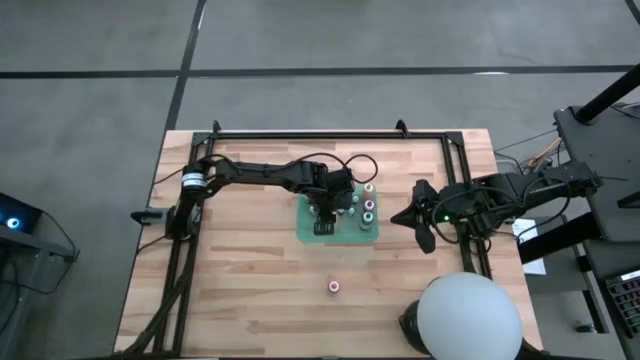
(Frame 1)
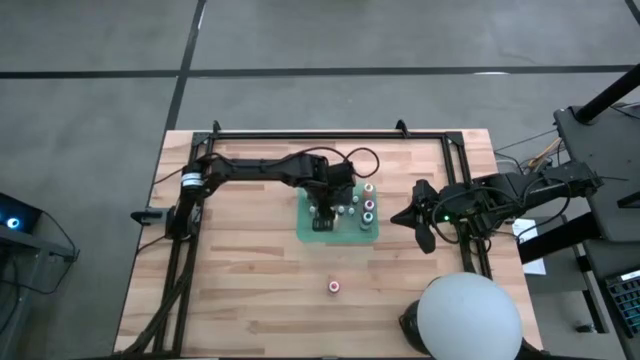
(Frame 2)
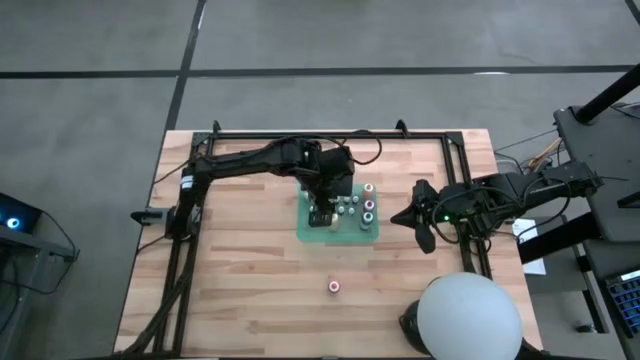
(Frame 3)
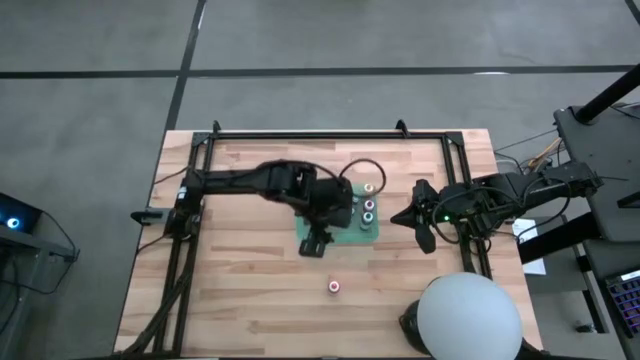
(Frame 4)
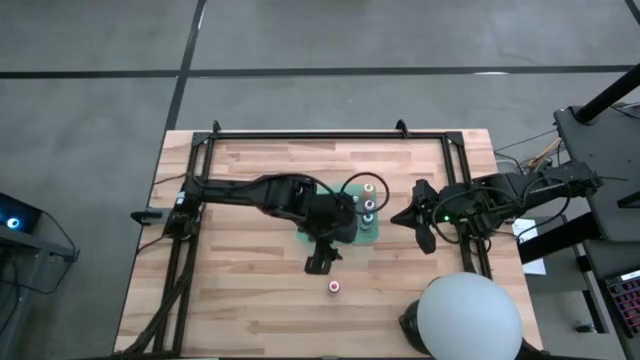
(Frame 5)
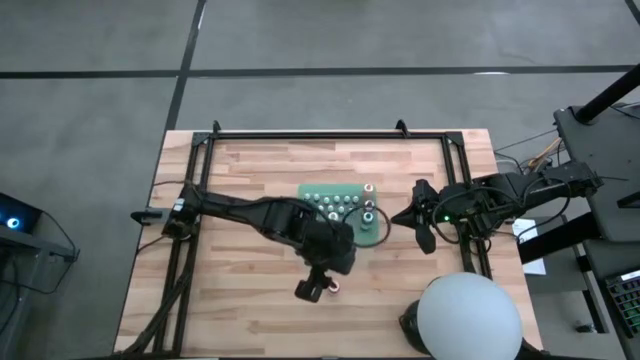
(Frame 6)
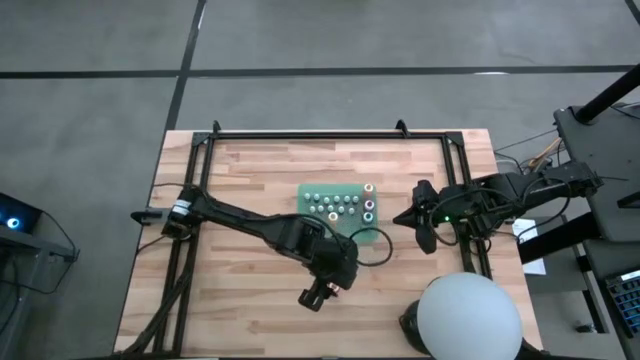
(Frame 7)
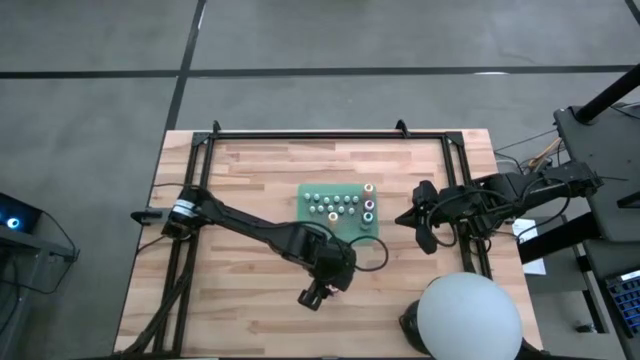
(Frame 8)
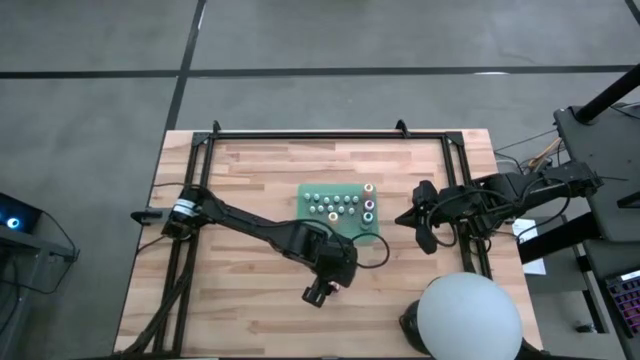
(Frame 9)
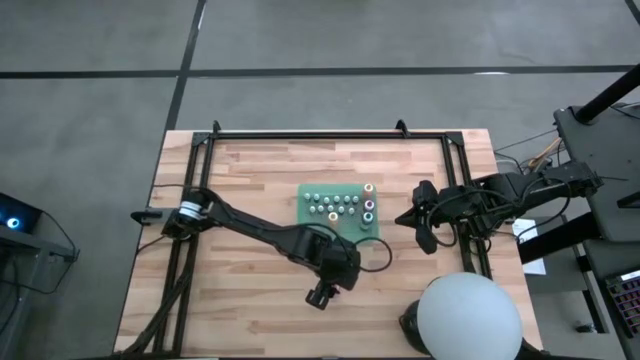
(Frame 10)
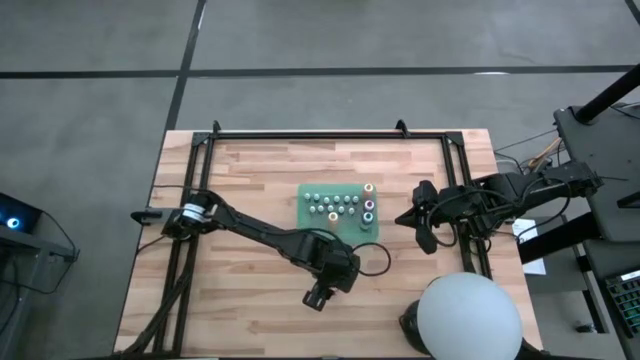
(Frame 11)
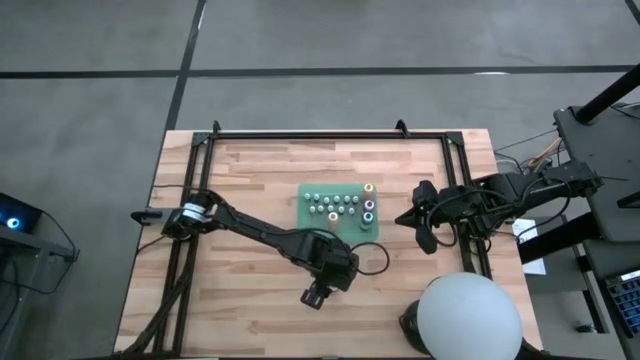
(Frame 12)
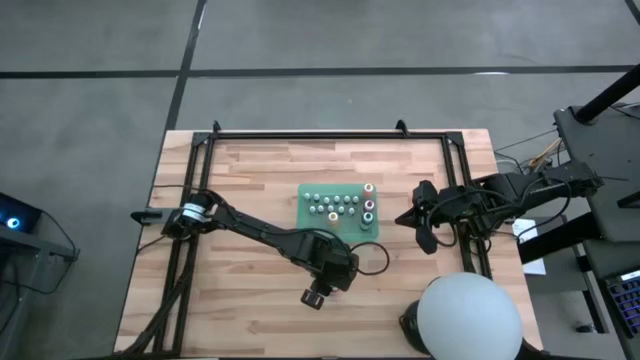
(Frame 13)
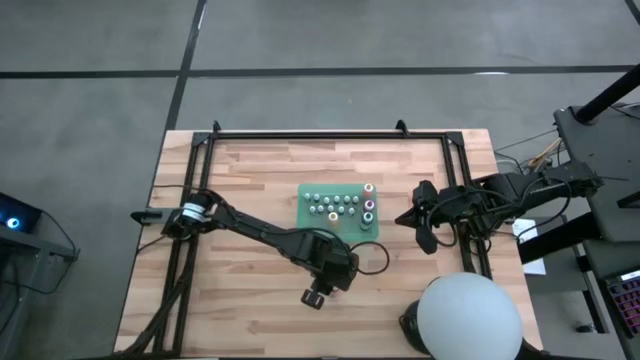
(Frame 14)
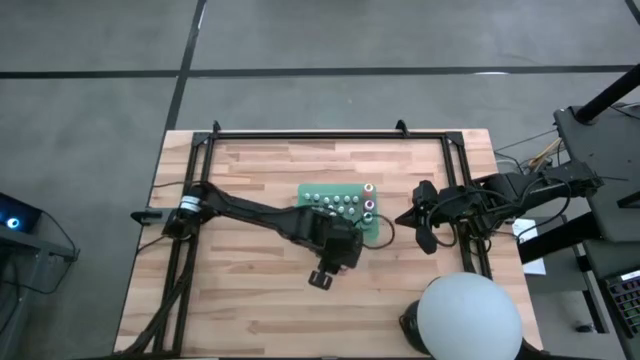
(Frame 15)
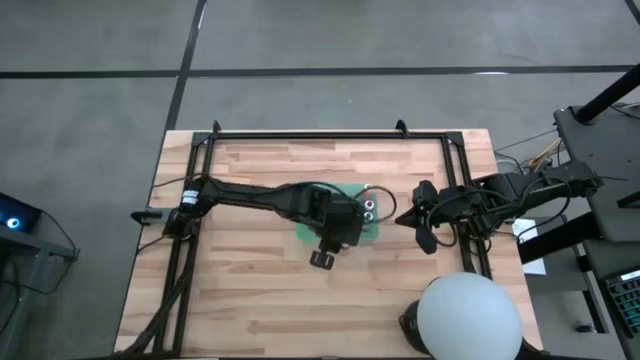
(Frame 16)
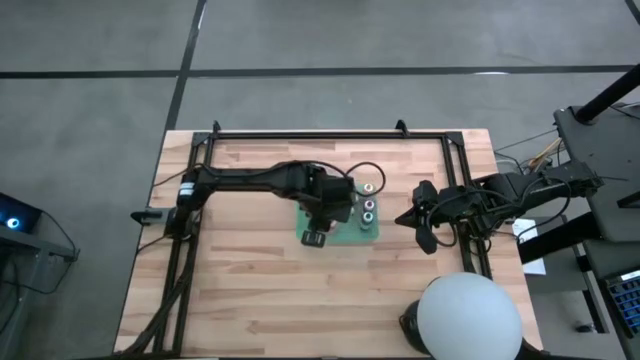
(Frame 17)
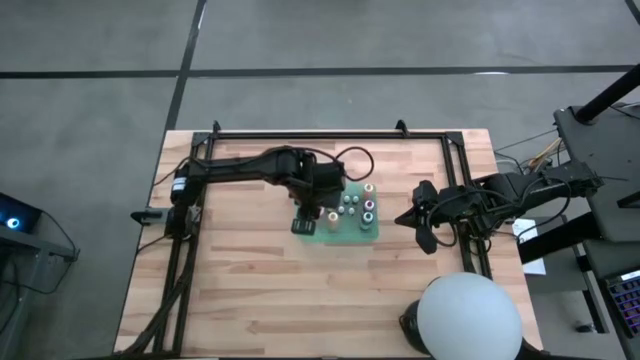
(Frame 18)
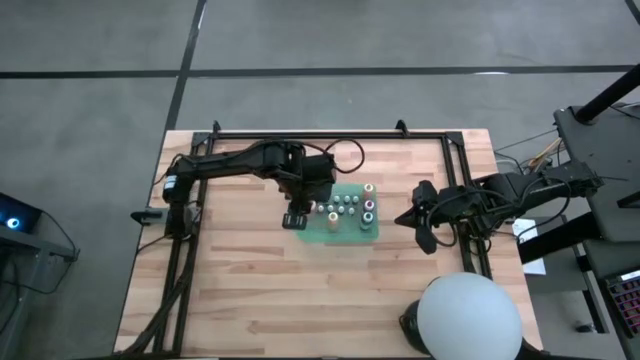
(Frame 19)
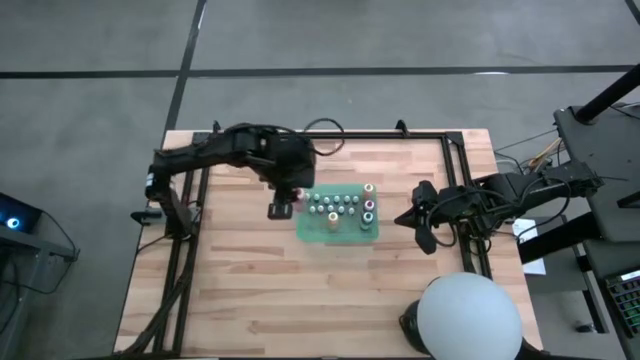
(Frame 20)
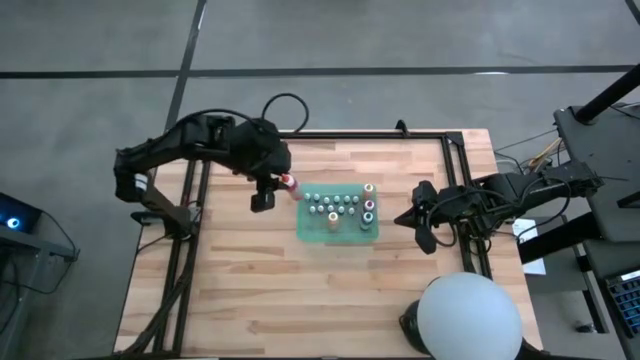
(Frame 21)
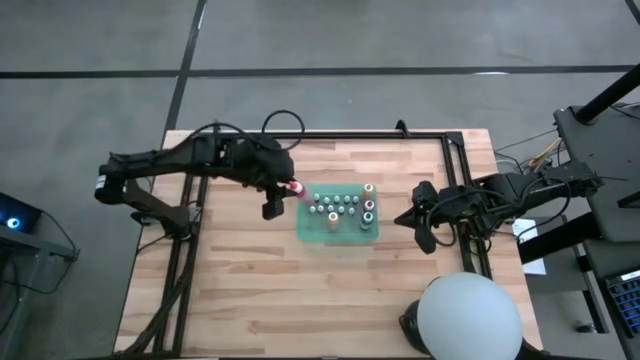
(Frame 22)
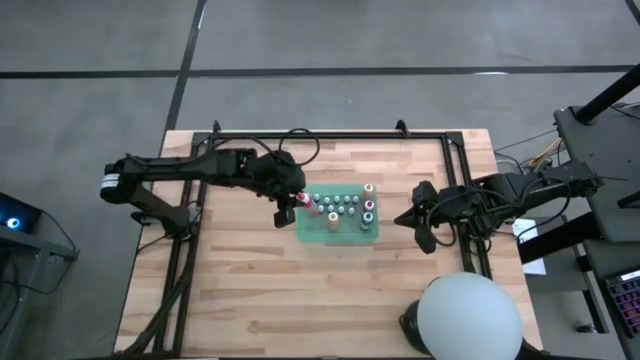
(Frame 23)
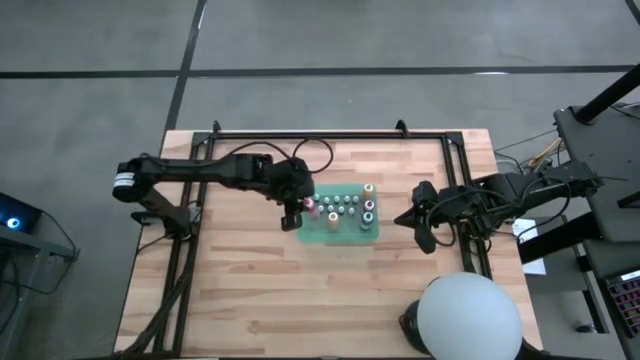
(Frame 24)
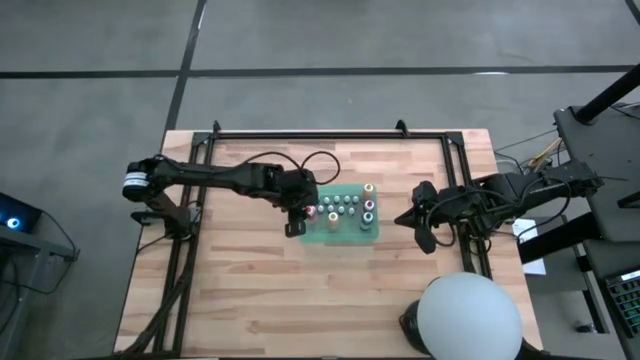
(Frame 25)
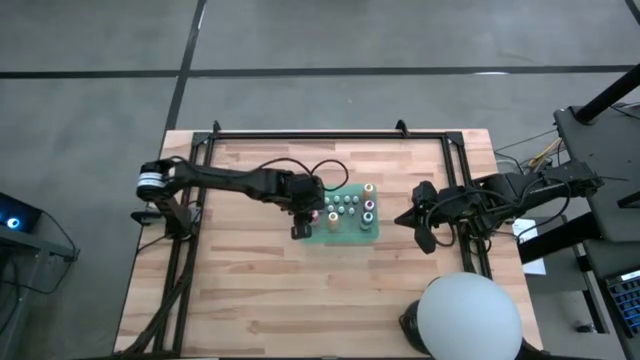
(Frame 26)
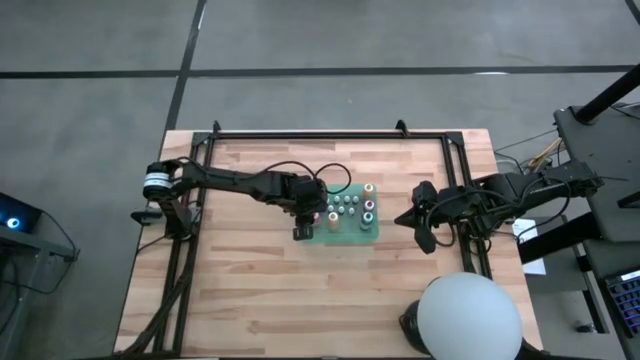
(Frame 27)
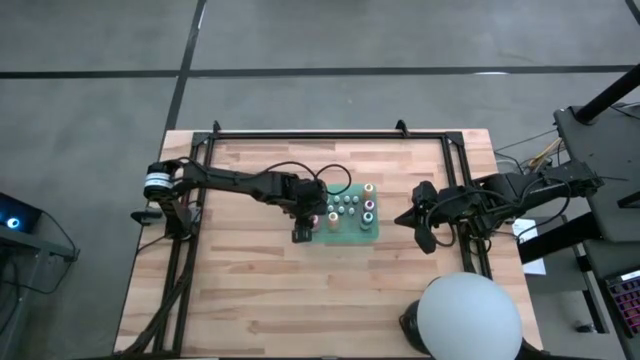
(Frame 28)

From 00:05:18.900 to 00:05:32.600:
Task: Pick & Place food coloring
Put the big red food coloring bottle into the green container

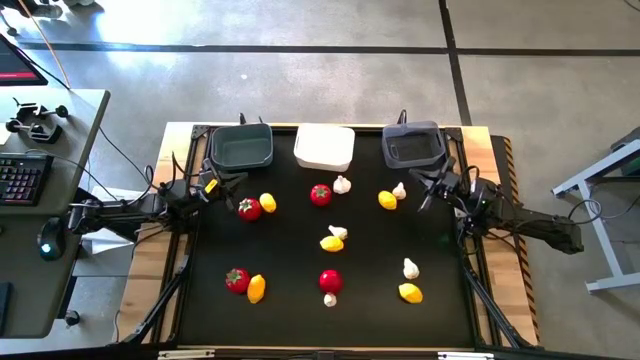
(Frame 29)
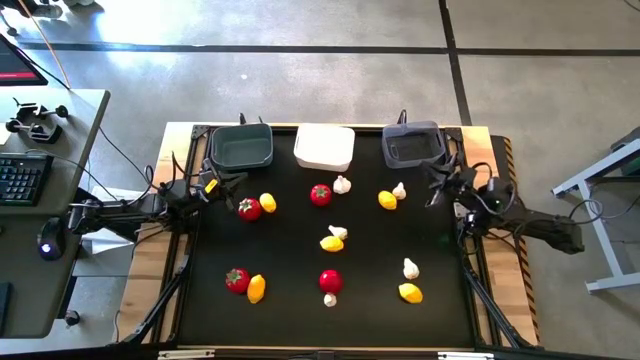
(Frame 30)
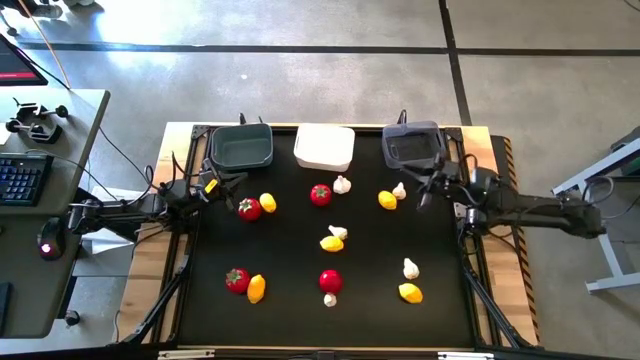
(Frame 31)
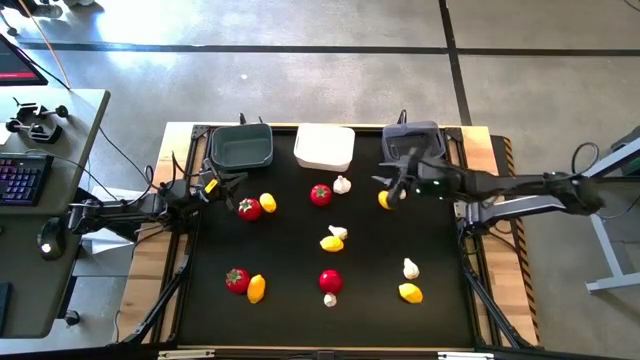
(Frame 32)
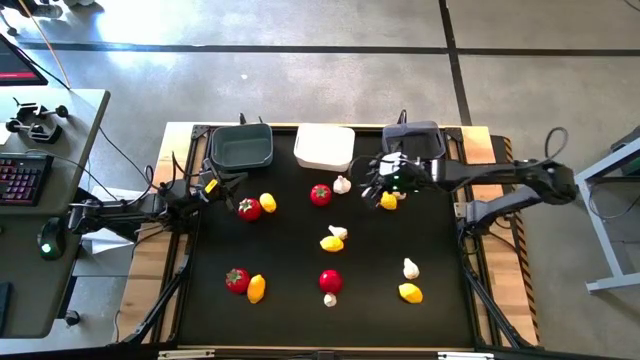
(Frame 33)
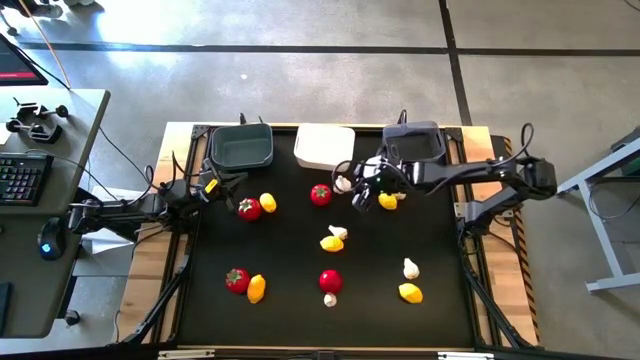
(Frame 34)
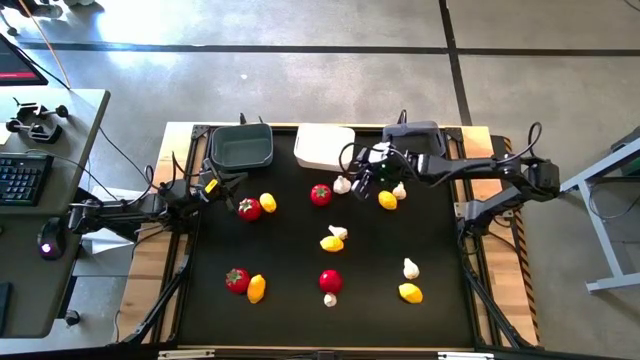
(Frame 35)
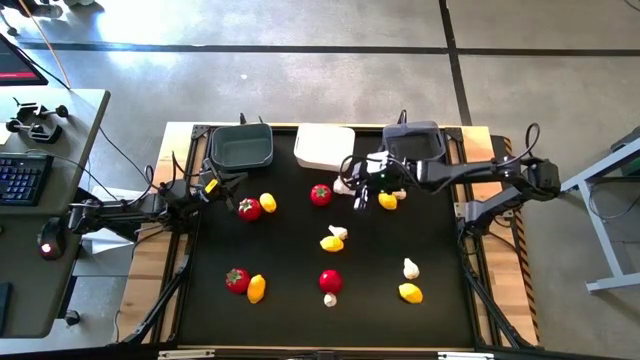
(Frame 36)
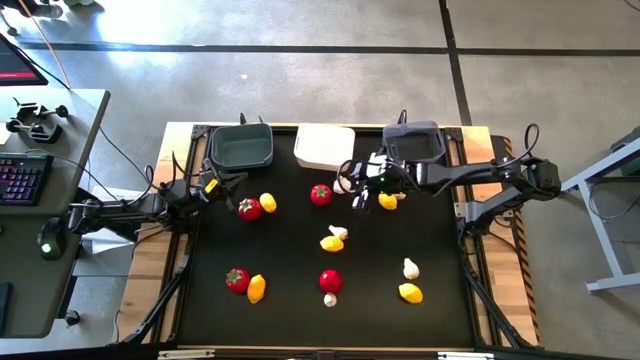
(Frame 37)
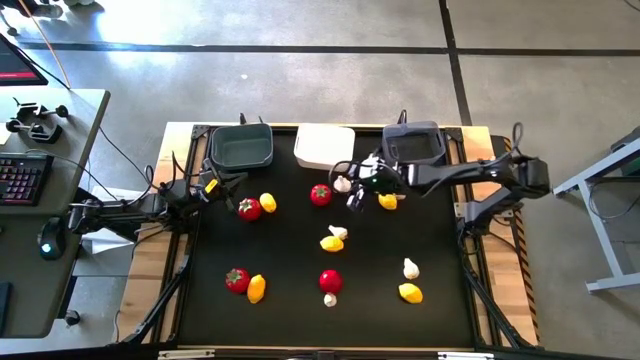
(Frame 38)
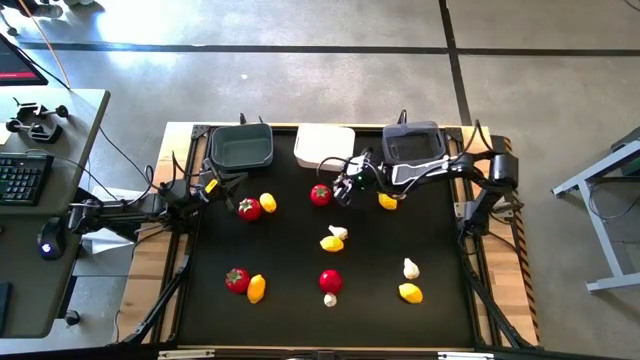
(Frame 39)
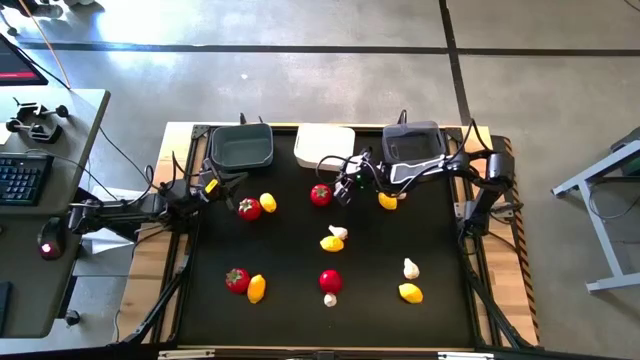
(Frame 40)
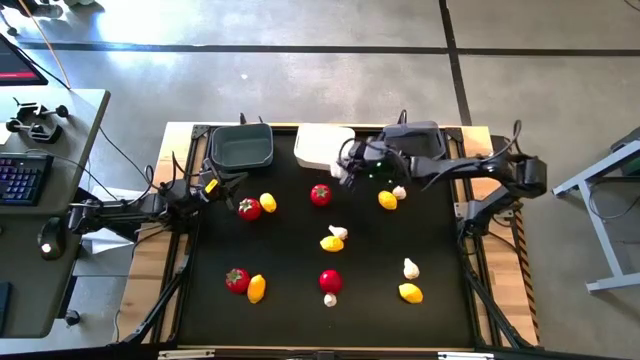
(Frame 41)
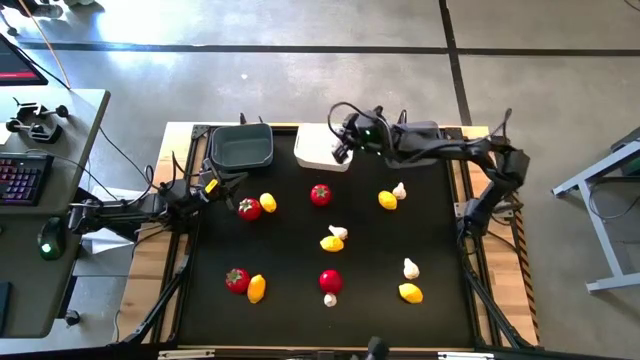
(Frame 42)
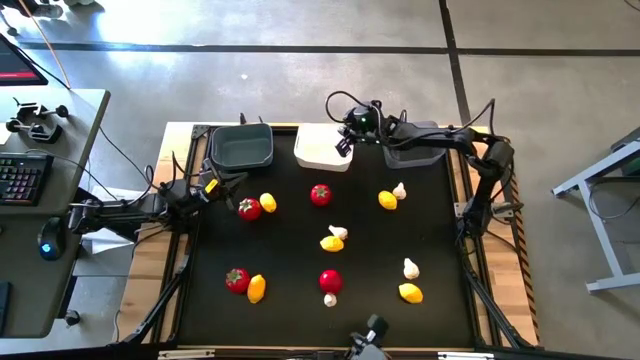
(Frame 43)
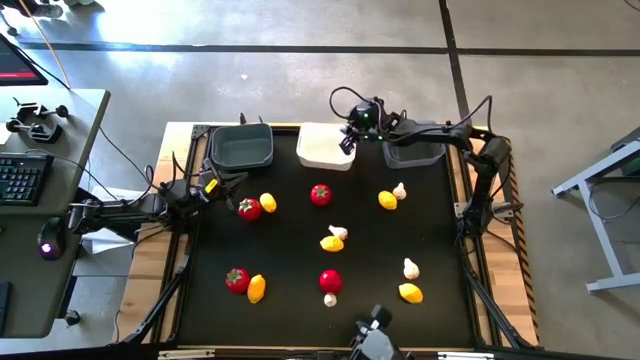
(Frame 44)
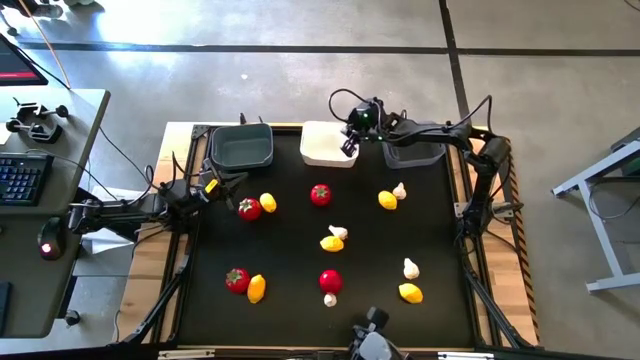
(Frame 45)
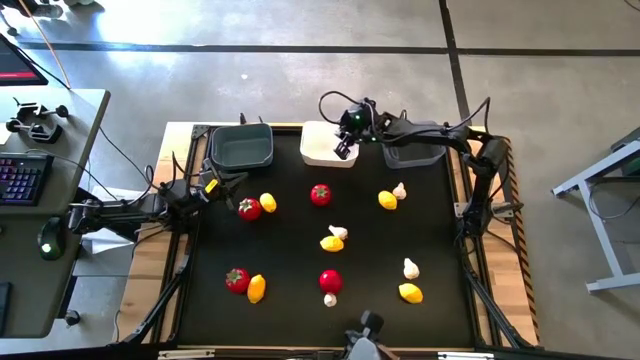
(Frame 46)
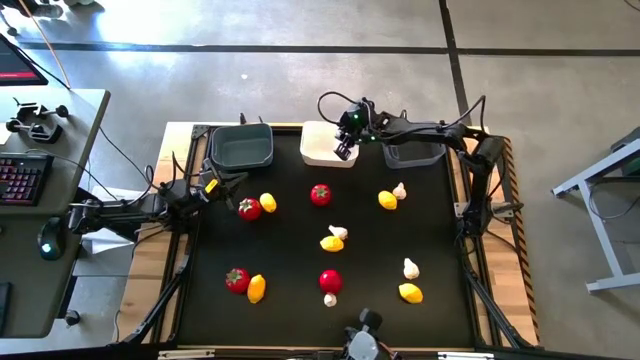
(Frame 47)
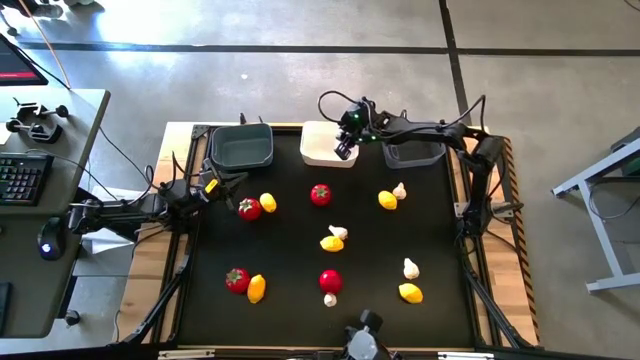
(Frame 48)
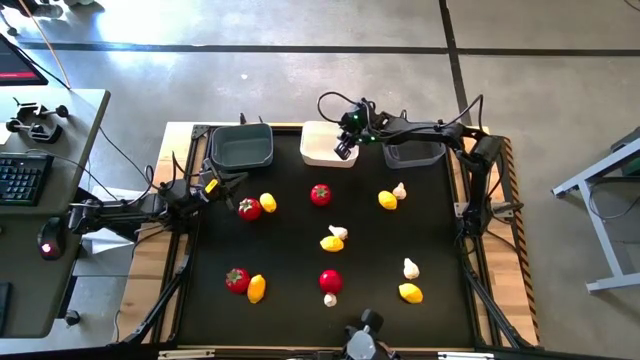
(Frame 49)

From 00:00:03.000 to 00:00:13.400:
Task: Sort produce into baskets
Put the top left white garlic into the white bin
